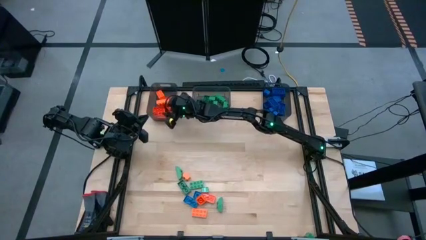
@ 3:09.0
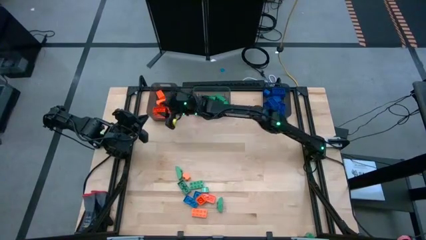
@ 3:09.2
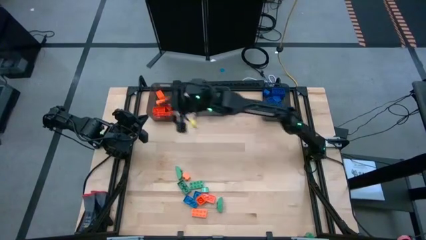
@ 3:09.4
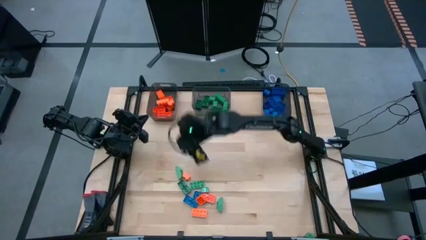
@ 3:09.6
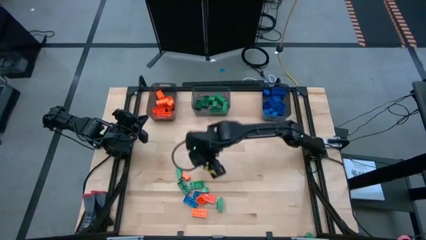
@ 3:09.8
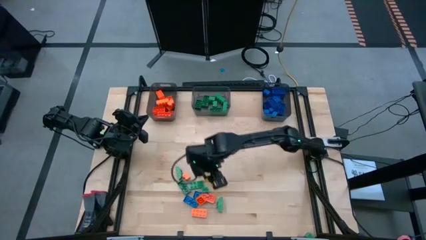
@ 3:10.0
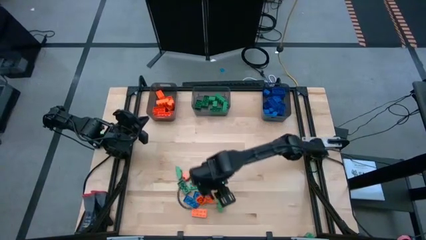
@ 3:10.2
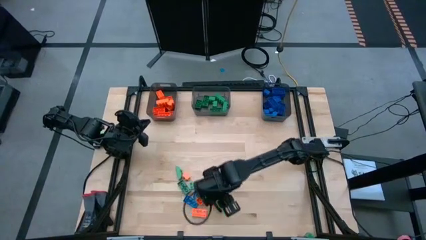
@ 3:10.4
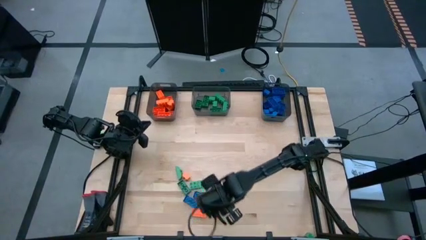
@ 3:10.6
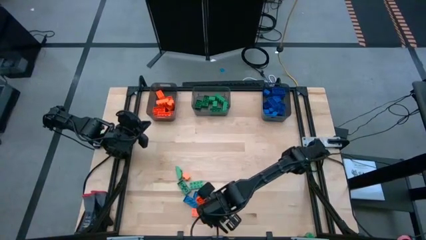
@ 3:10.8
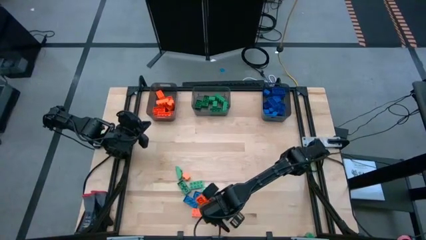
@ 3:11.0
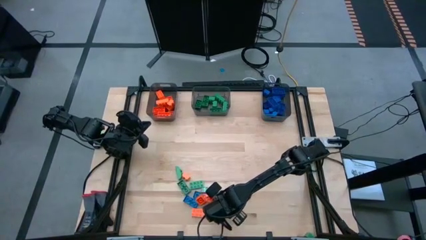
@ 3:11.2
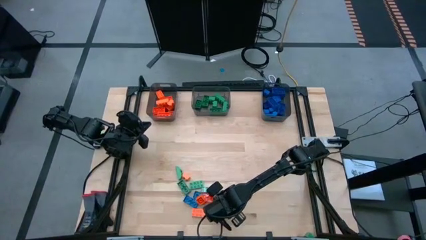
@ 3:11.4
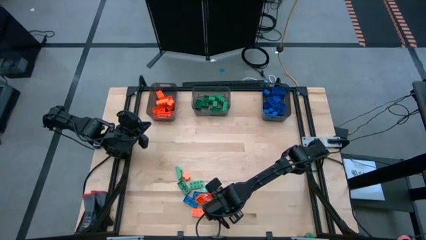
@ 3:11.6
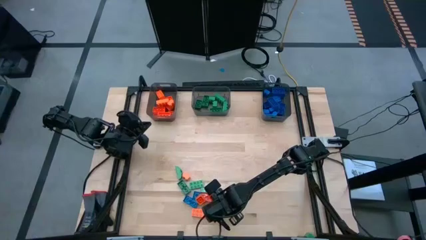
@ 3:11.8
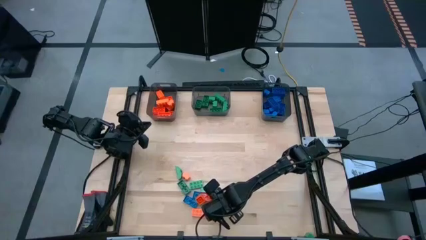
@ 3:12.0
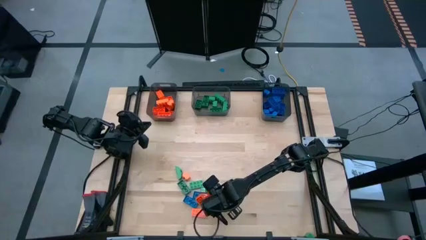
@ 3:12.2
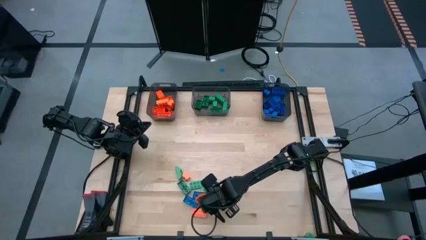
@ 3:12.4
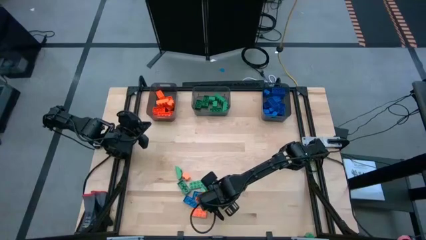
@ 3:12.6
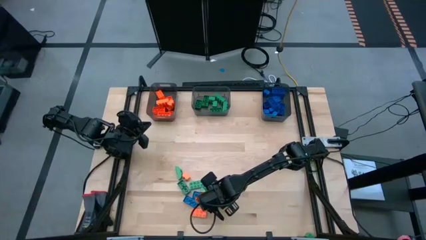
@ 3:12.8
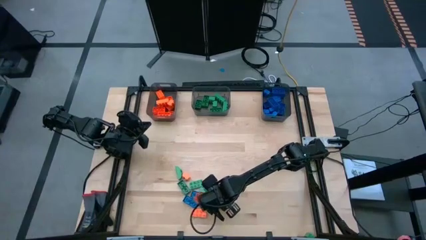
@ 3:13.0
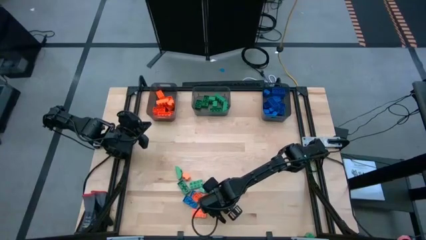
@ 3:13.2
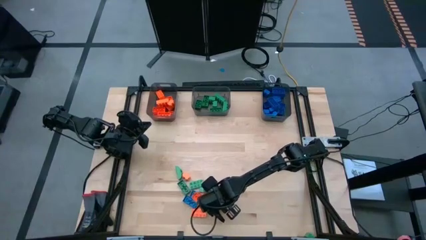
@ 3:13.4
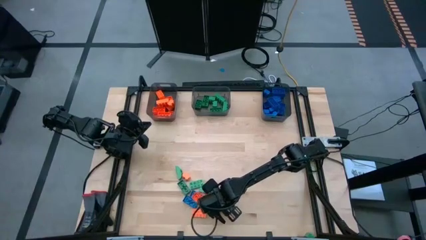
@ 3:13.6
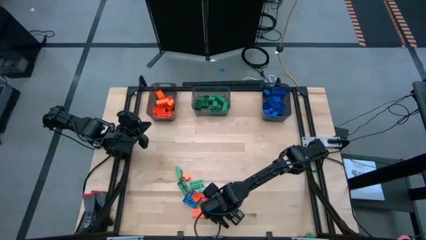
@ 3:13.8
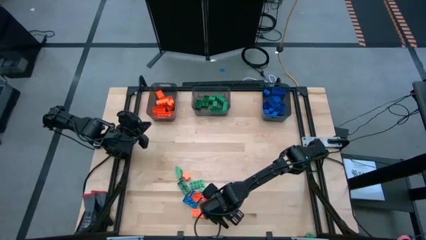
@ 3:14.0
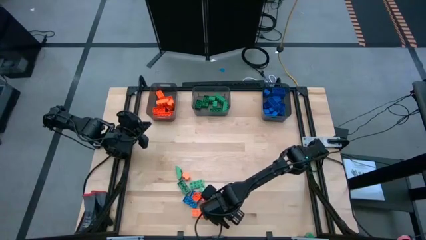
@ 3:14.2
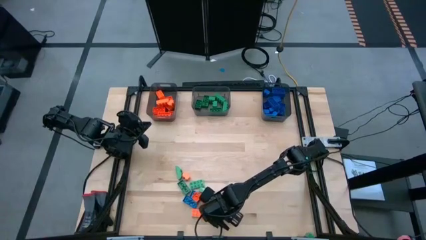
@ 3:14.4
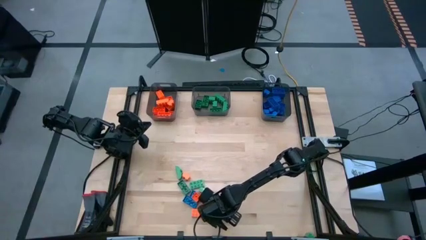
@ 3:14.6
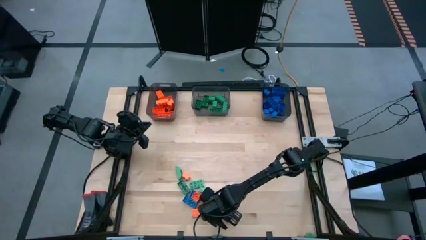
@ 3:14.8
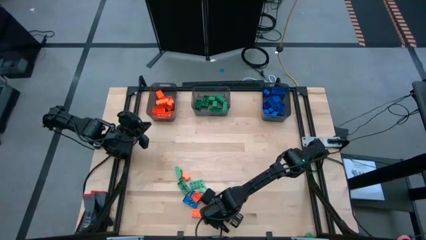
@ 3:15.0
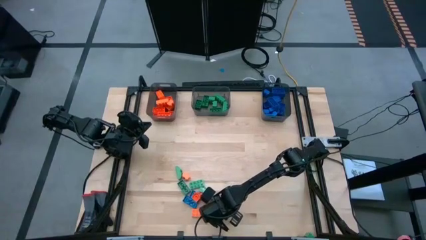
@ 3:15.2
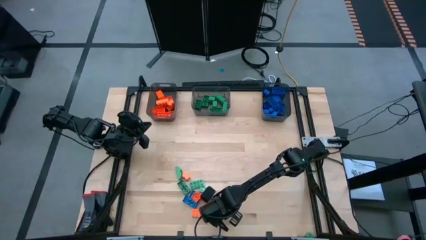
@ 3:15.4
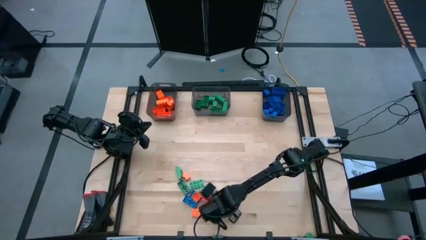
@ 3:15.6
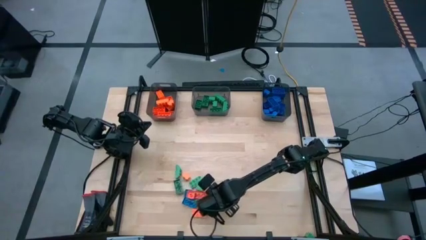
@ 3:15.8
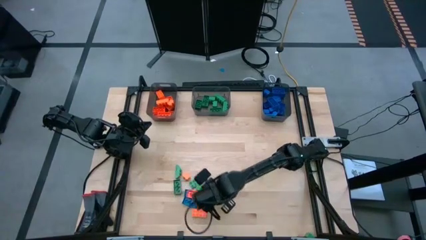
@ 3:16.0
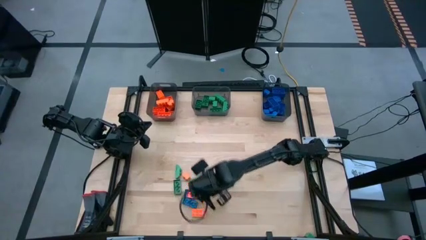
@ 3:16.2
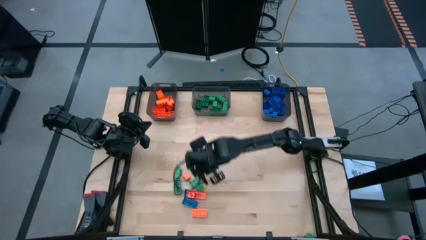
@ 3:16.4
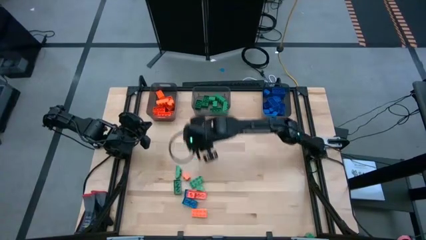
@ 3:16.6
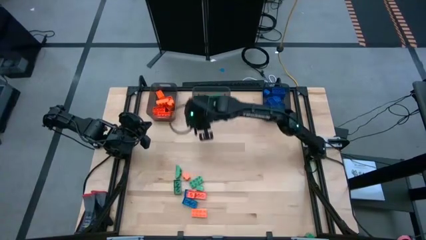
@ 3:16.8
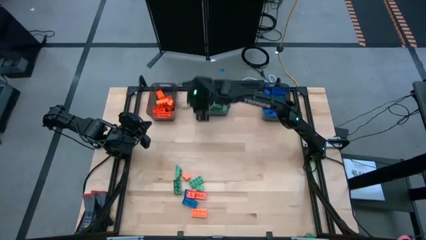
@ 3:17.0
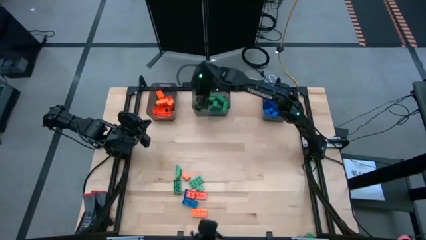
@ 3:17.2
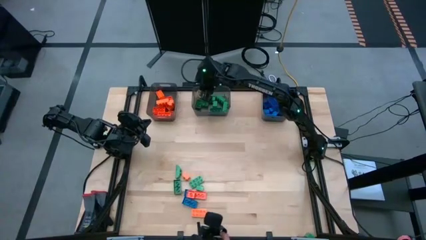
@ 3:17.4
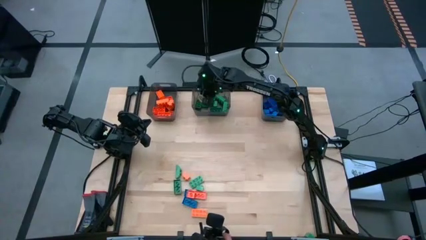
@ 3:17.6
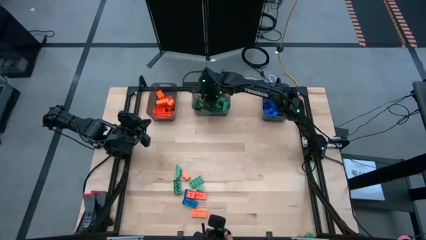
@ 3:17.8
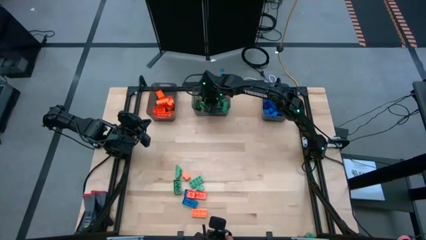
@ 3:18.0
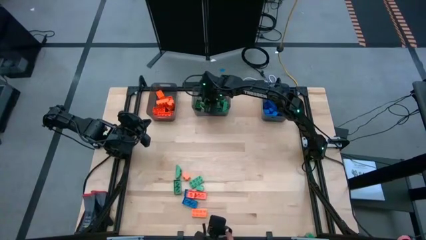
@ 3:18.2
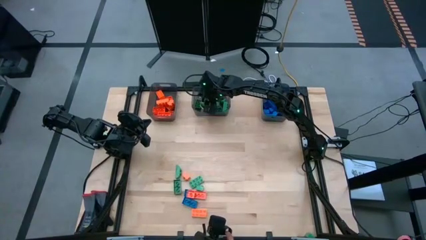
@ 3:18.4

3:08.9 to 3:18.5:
Task: Sort blocks
Put the green piece into the middle black bin

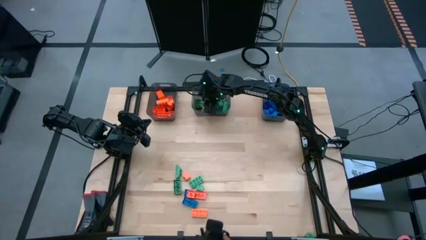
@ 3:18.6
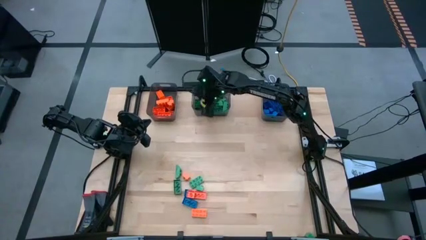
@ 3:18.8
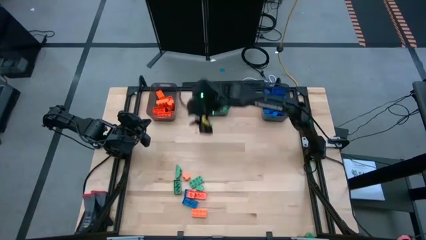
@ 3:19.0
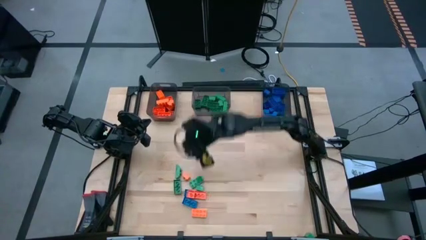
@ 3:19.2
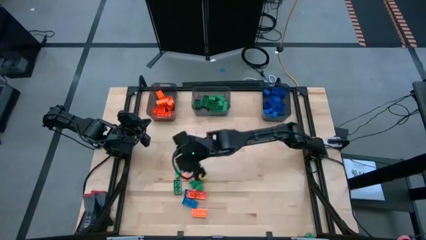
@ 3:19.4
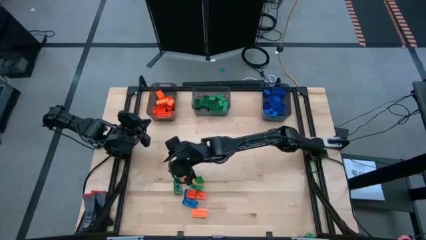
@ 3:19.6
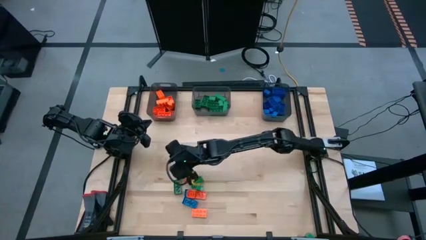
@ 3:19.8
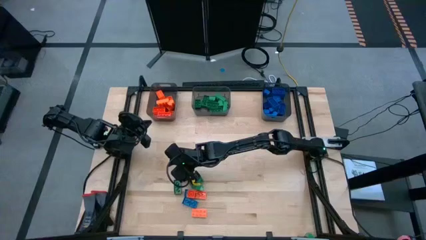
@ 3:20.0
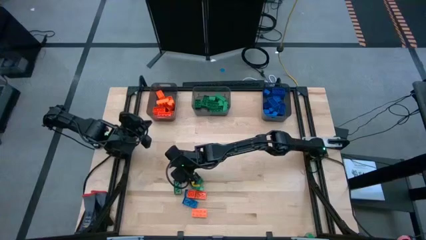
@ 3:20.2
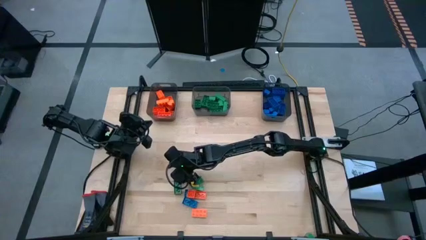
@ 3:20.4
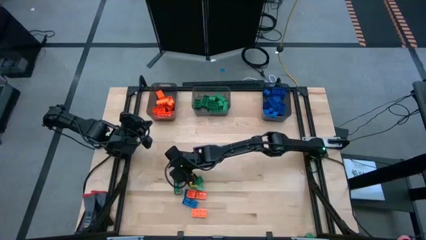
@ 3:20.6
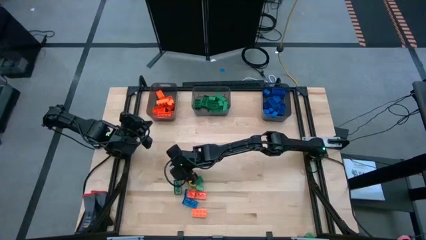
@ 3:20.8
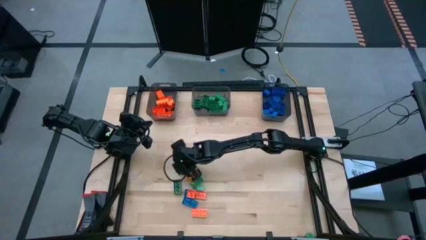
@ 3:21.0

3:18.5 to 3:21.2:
Put the green piece into the middle black bin

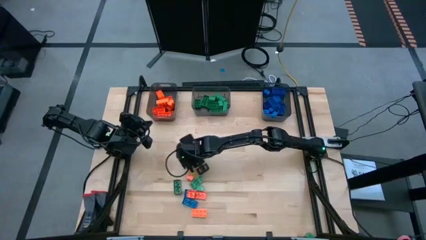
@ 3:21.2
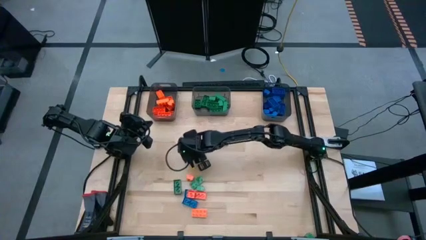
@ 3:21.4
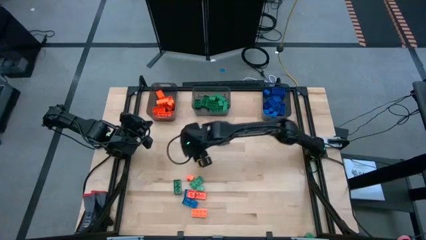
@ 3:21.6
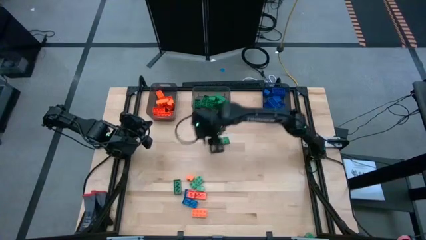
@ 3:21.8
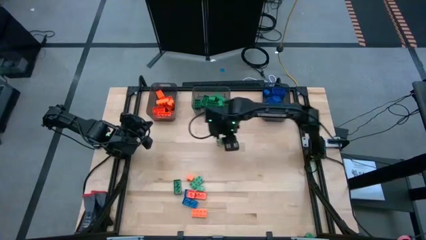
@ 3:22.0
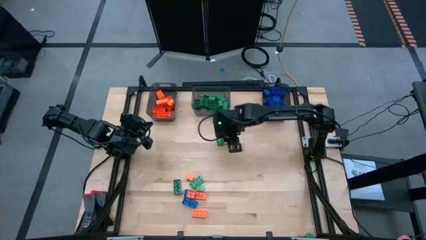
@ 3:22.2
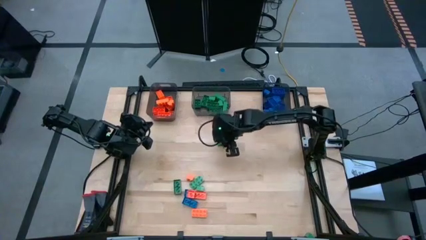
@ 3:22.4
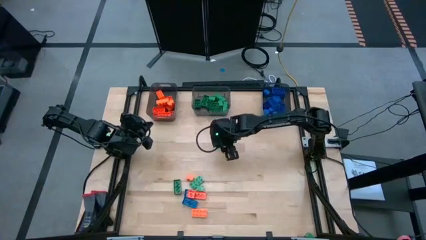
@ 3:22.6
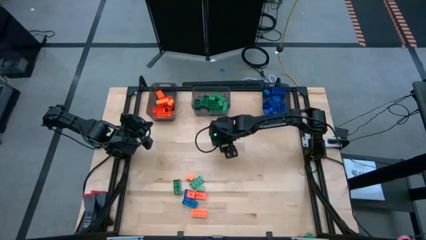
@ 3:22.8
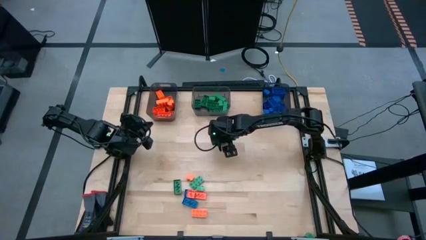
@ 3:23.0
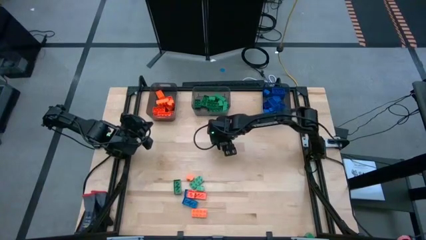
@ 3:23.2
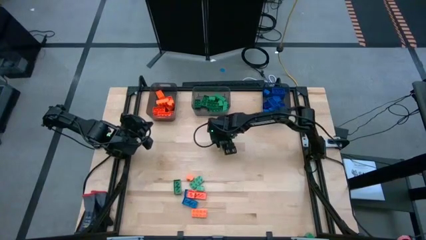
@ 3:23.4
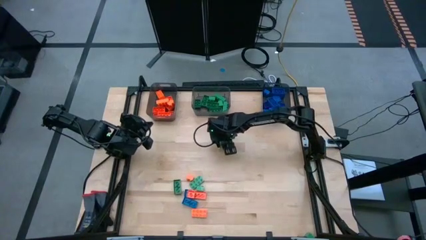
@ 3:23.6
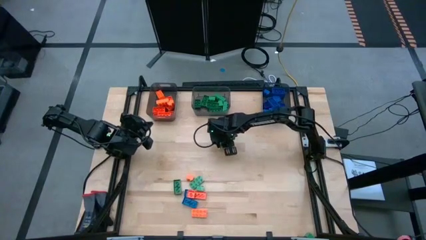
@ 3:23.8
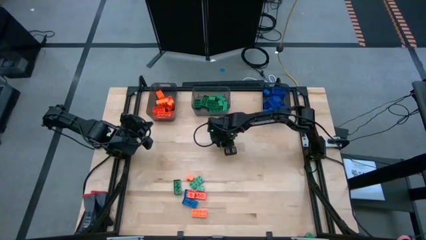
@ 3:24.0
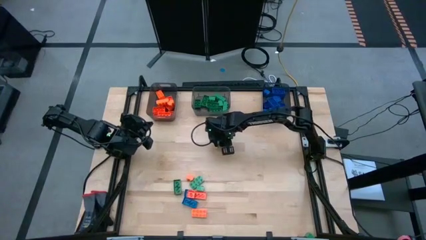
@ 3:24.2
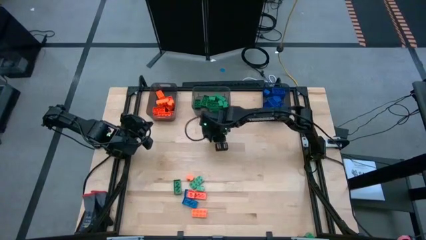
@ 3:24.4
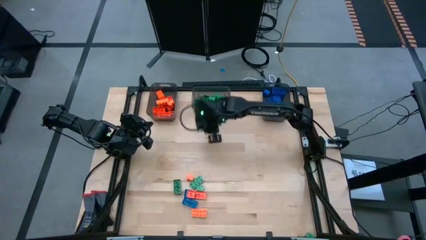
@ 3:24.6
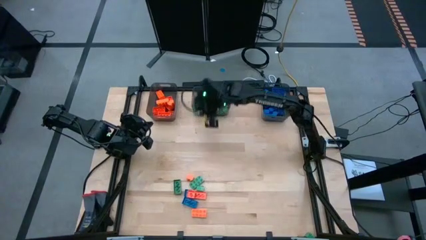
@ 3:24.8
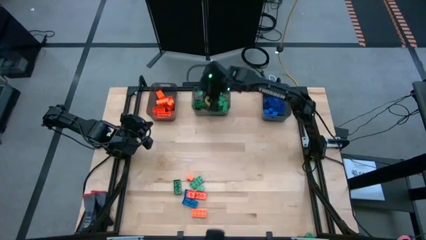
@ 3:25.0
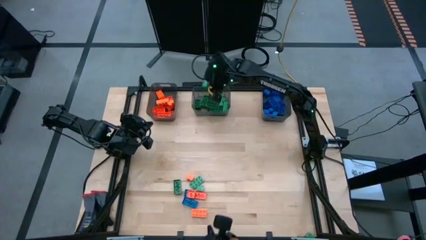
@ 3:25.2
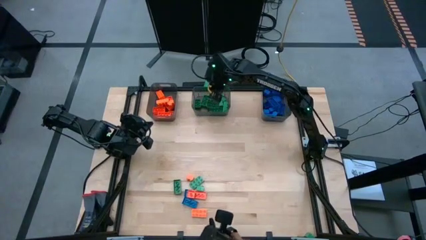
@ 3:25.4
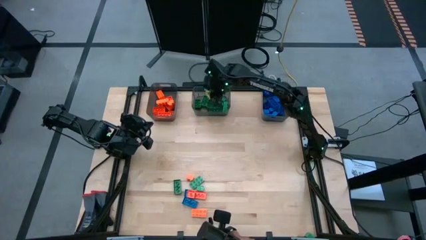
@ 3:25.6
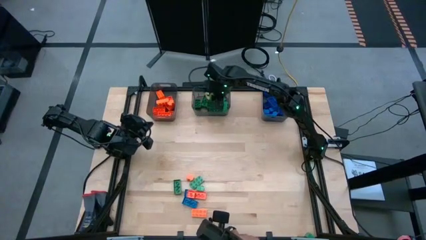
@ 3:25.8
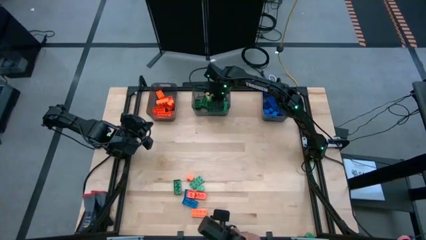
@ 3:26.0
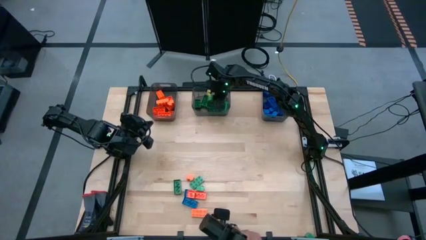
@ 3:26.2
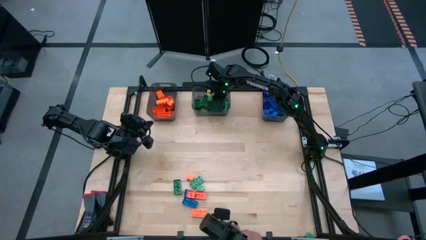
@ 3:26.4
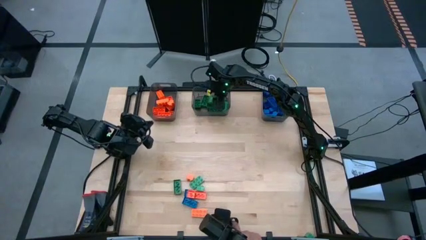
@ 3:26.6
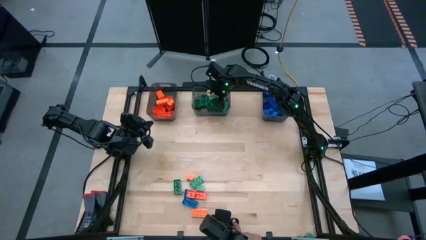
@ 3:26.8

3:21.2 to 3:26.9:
Put the green piece into the middle black bin
